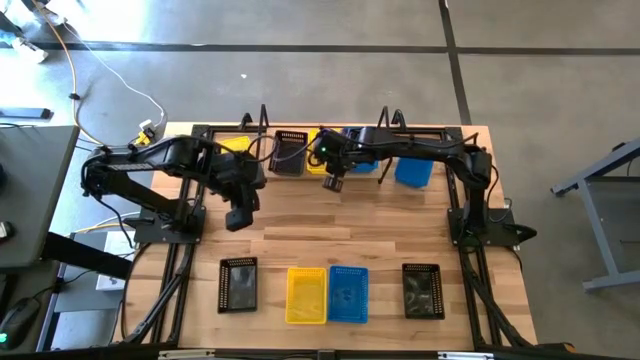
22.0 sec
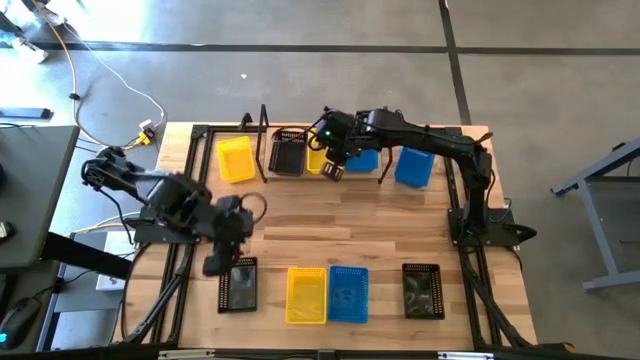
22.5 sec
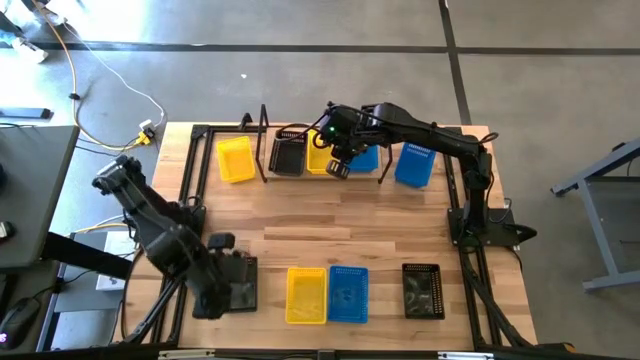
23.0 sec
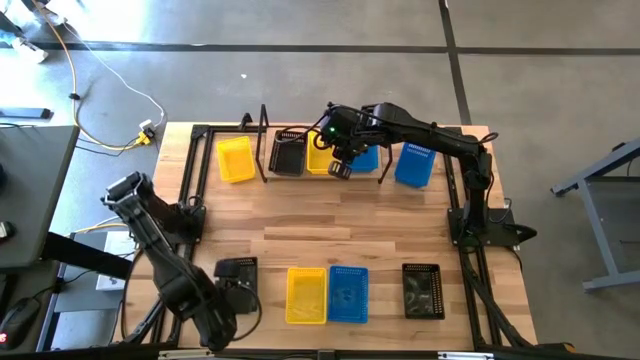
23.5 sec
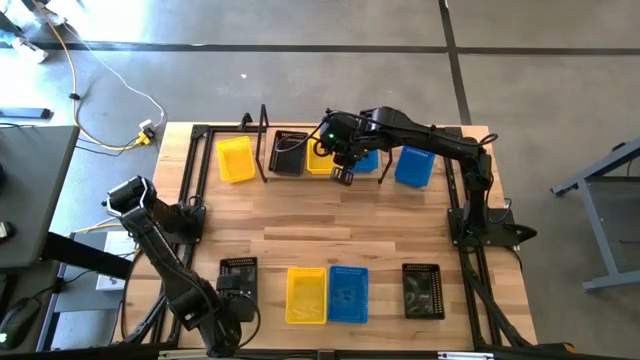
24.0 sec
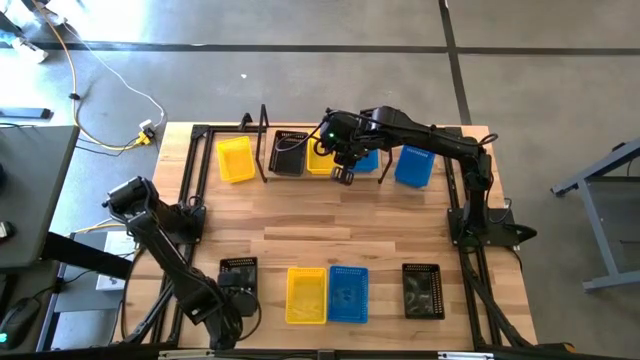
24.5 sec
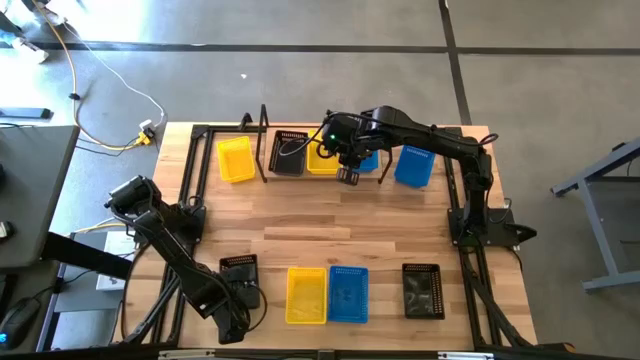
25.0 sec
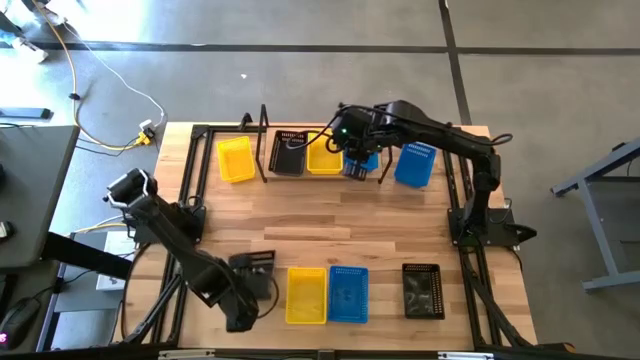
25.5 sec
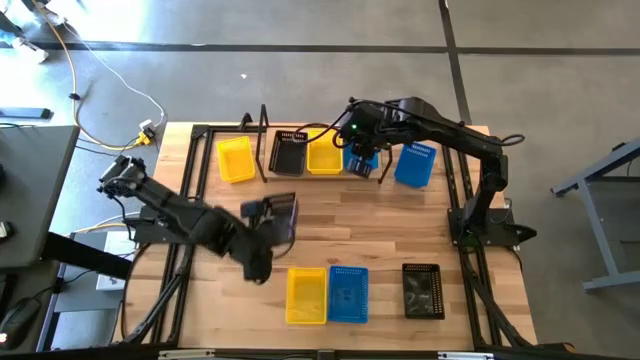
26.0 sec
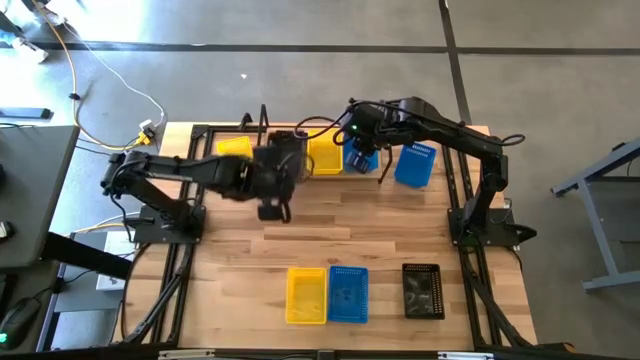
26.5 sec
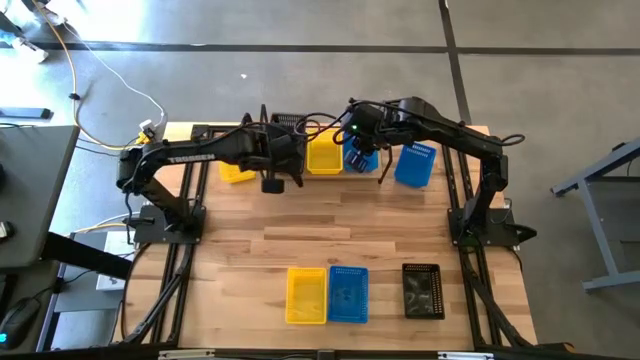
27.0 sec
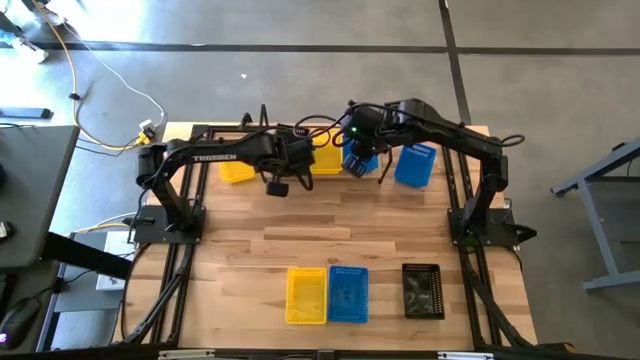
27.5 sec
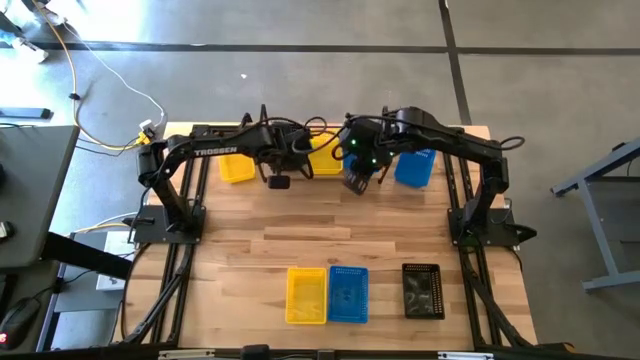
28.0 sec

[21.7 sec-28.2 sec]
Task: Stack baskets on shelf by color
Stack the left black bin on the black bin on the shelf

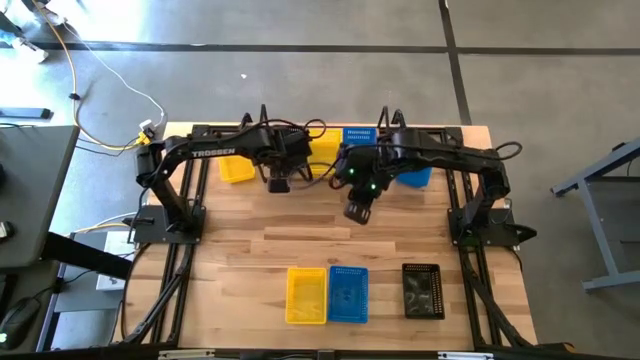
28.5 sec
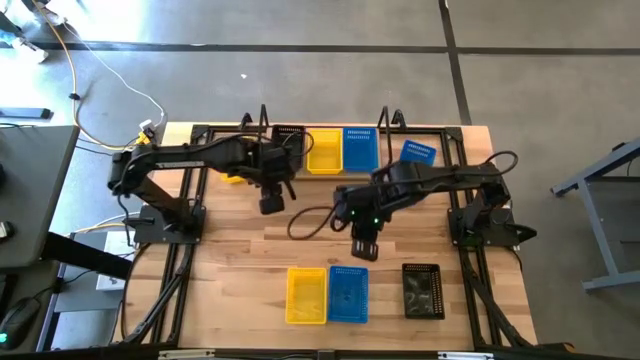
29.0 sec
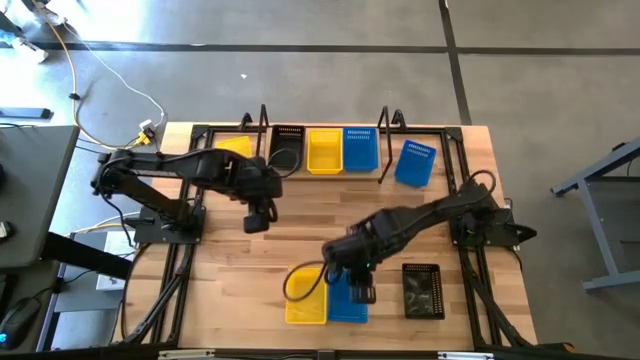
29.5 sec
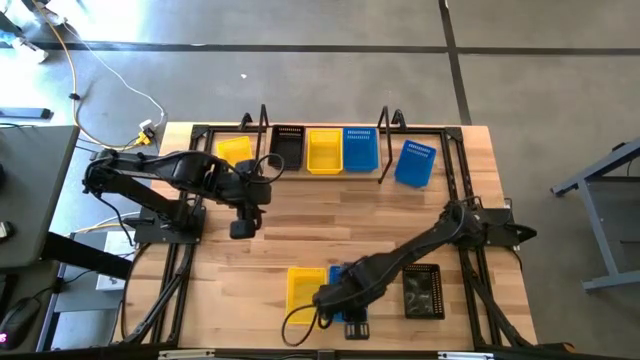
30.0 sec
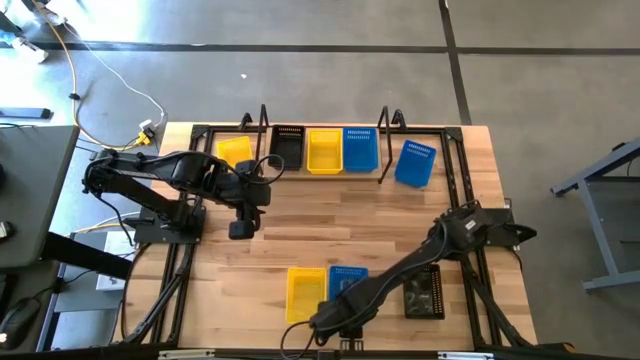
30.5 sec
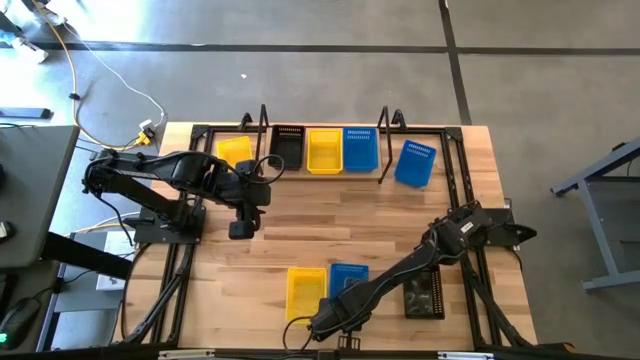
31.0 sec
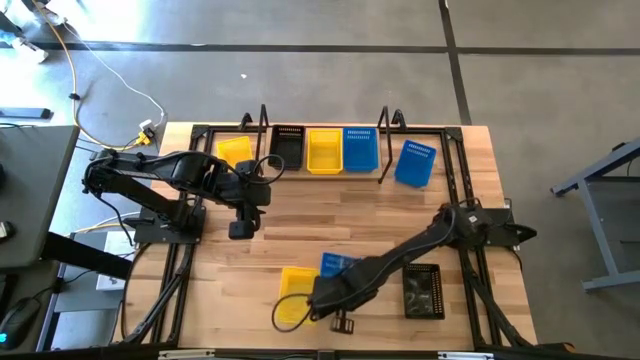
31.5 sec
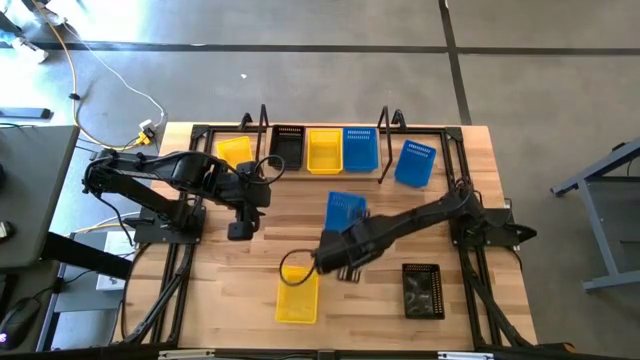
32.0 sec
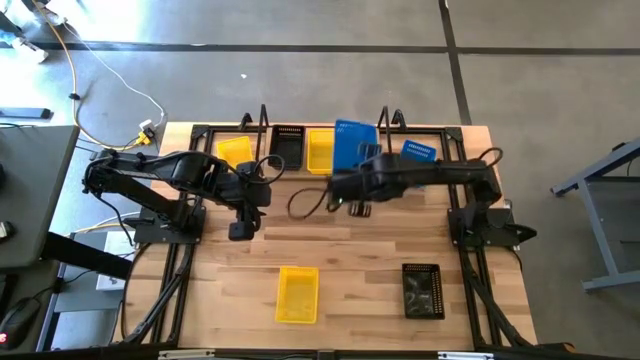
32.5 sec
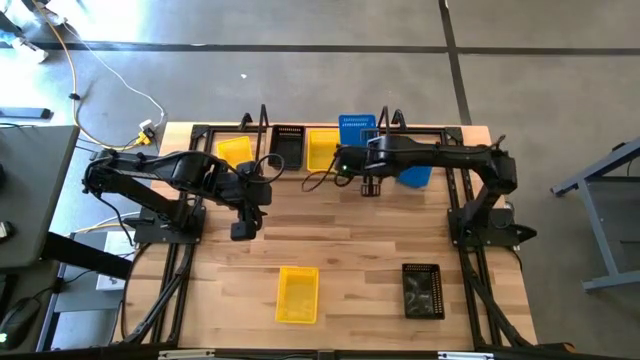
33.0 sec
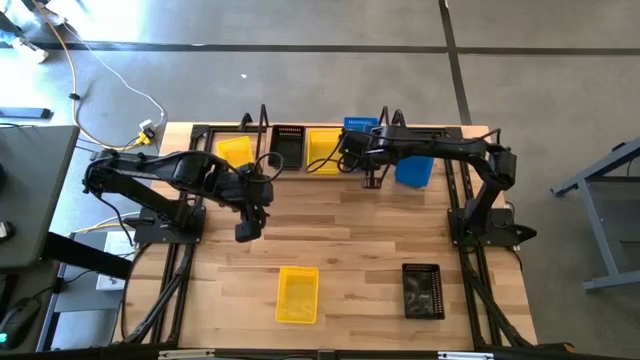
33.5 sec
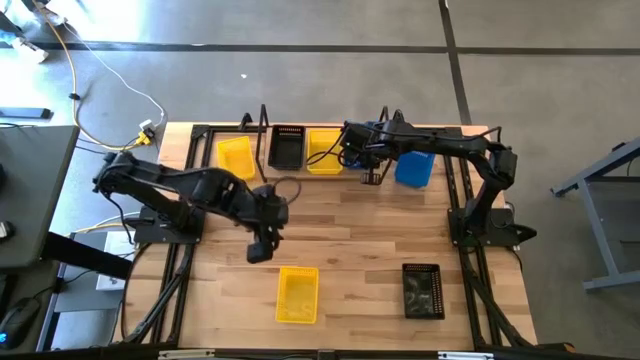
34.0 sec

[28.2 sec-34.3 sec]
Stack the bottom blue bin on the blue bin on the shelf

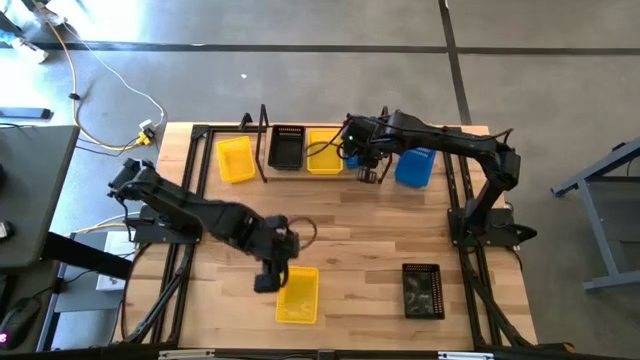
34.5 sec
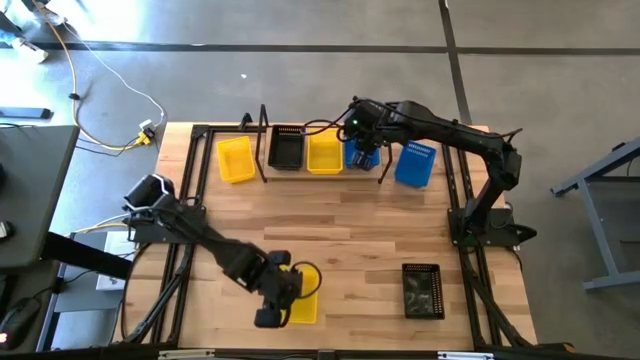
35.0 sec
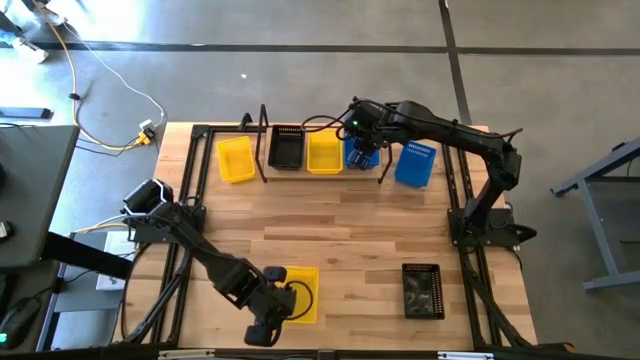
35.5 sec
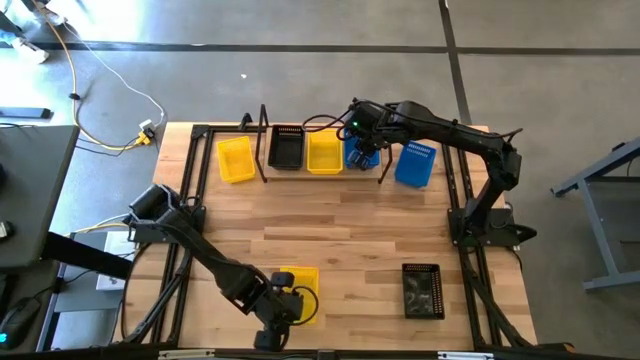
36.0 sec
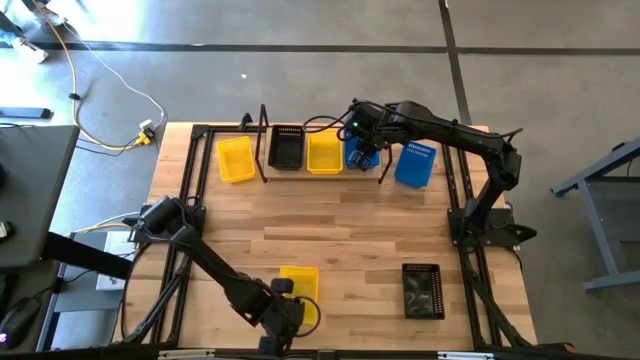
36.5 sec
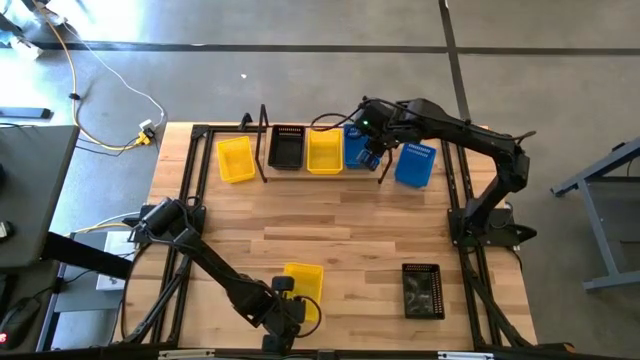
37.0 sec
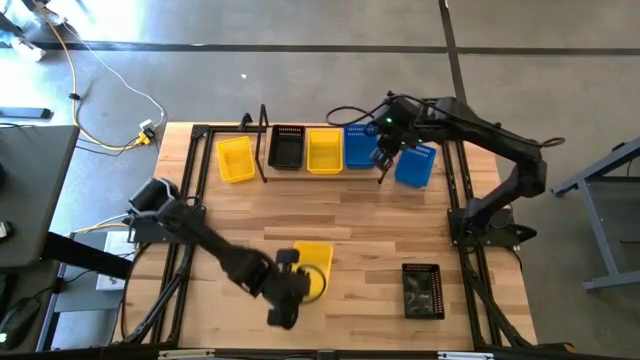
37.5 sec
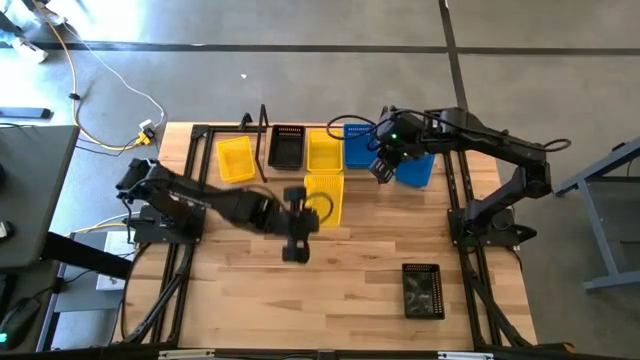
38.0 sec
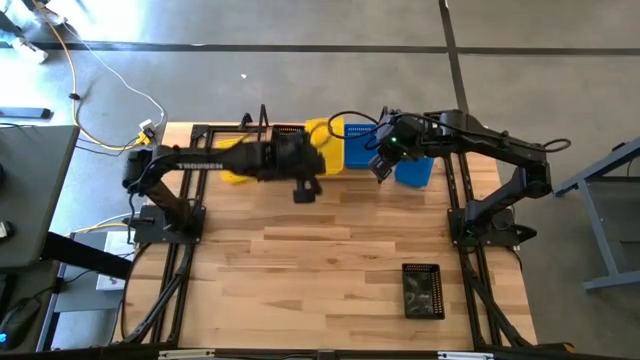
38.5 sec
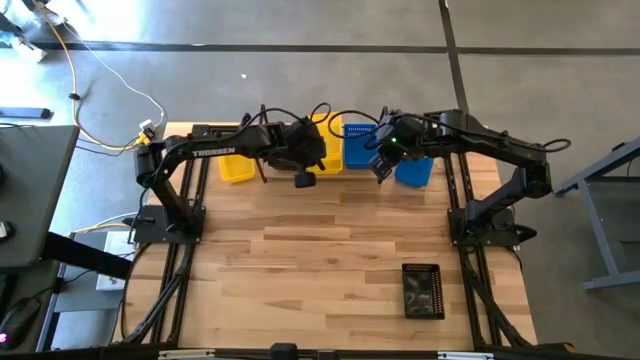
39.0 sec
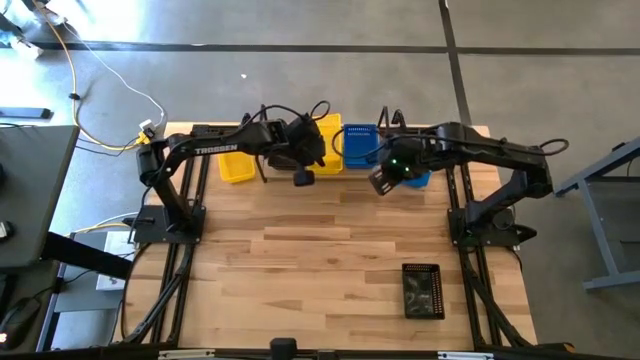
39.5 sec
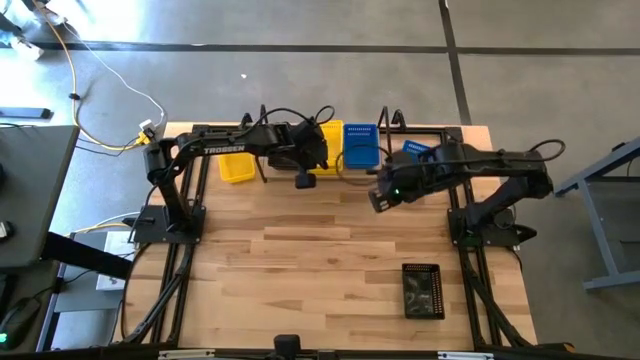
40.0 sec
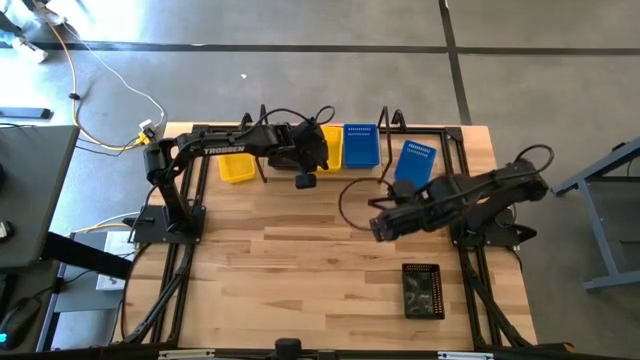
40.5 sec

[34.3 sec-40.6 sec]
Stack the bottom yellow bin on the yellow bin on the shelf

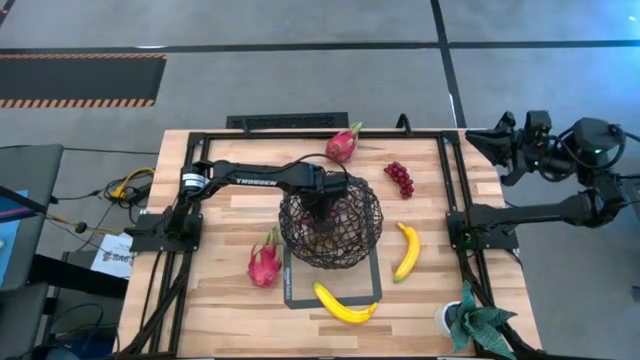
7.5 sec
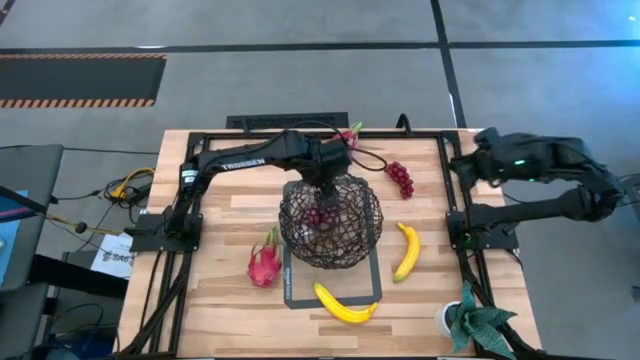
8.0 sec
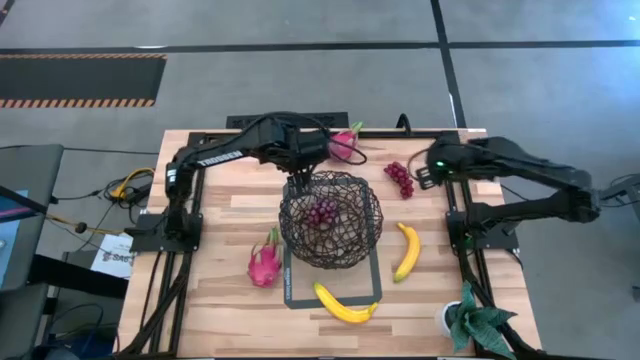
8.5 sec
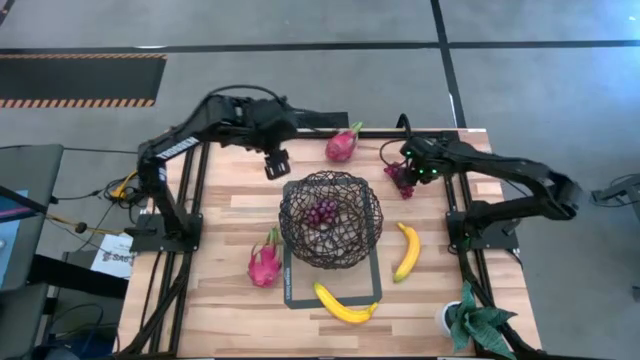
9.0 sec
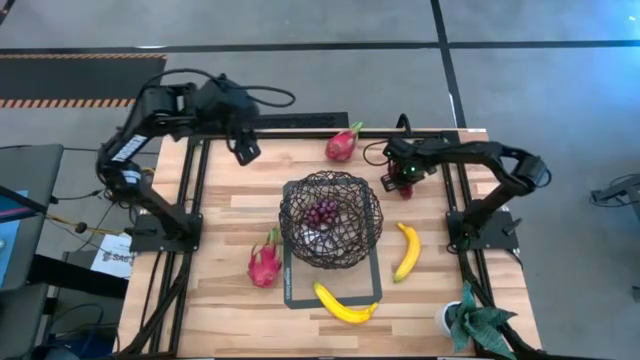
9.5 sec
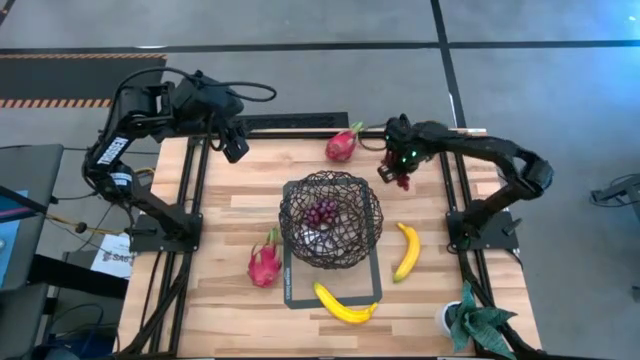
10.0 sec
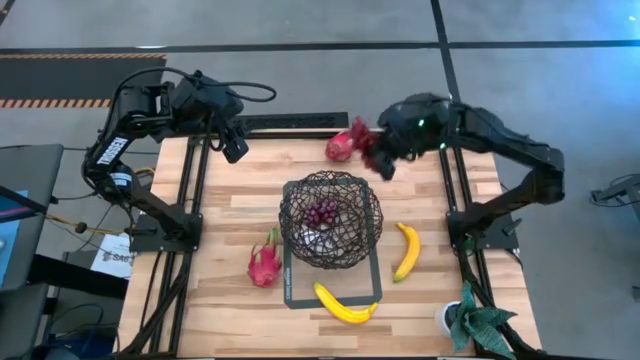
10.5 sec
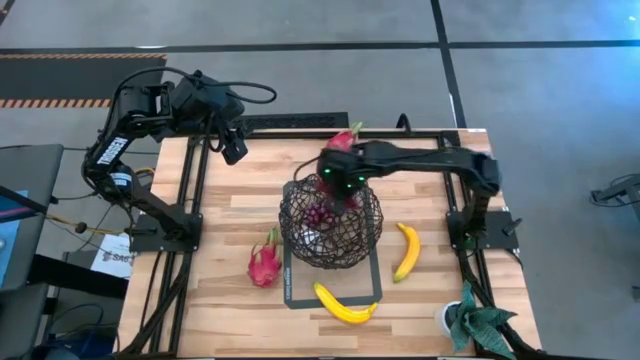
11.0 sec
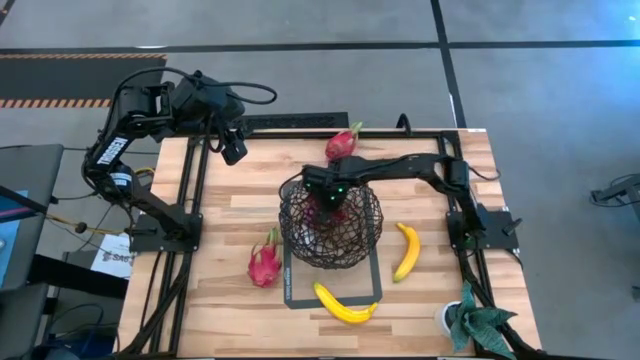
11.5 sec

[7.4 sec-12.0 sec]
Task: Build produce basket
Put the red grapes into the black wire basket
